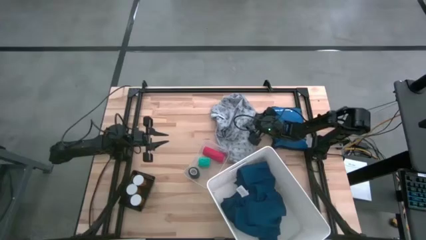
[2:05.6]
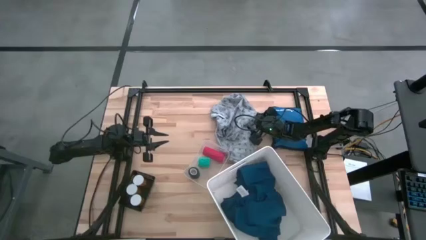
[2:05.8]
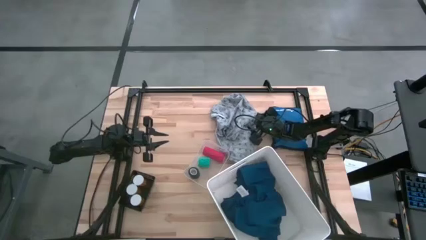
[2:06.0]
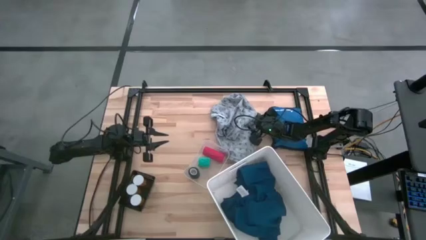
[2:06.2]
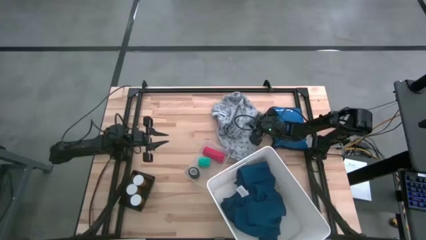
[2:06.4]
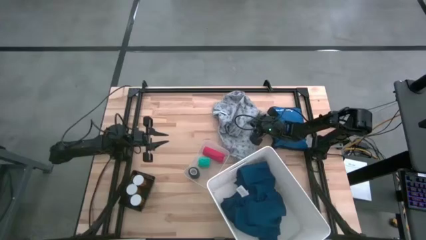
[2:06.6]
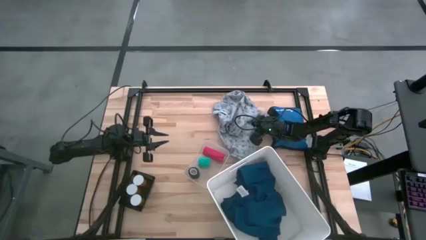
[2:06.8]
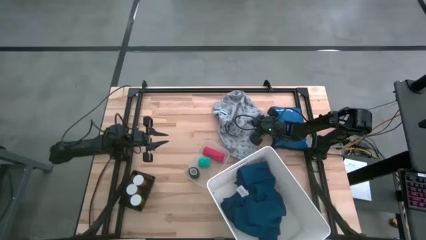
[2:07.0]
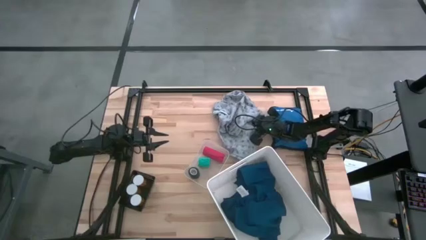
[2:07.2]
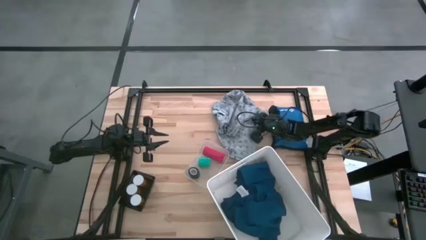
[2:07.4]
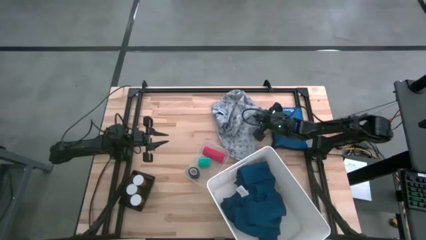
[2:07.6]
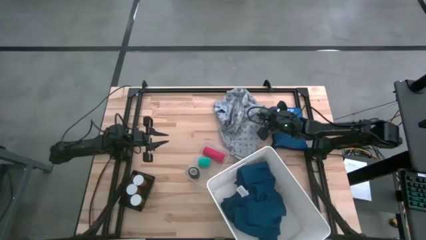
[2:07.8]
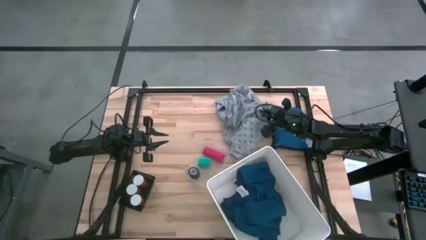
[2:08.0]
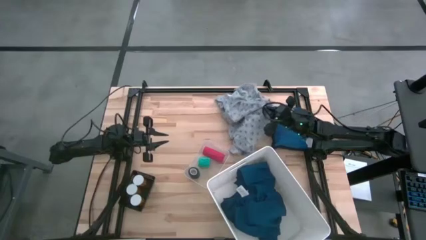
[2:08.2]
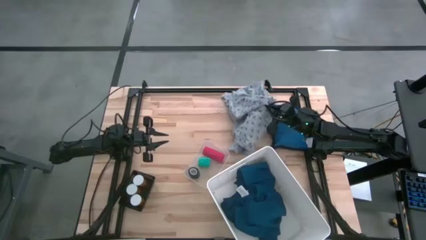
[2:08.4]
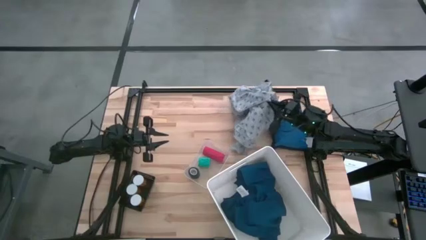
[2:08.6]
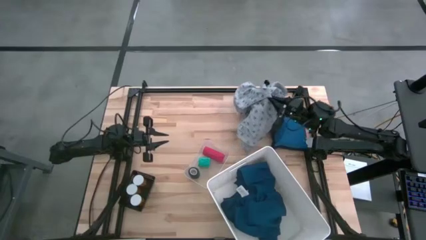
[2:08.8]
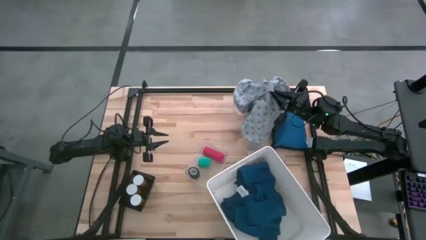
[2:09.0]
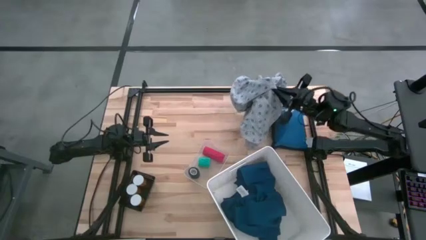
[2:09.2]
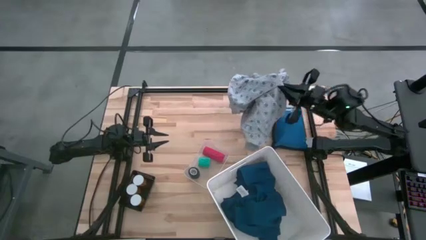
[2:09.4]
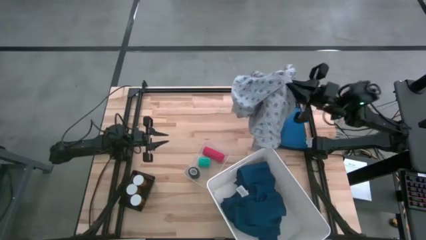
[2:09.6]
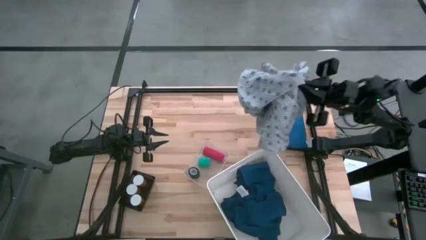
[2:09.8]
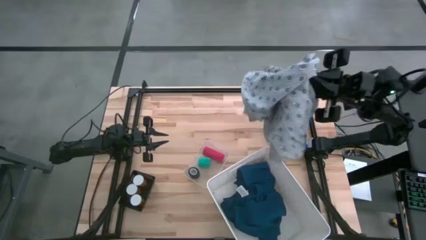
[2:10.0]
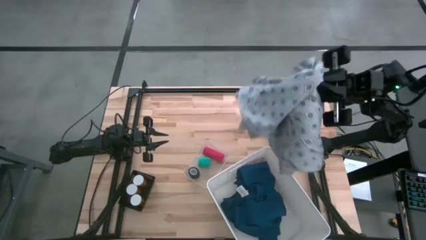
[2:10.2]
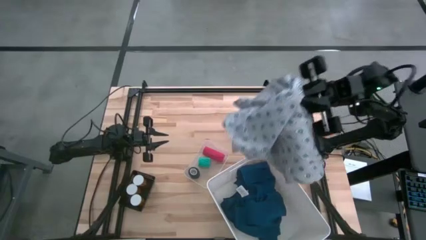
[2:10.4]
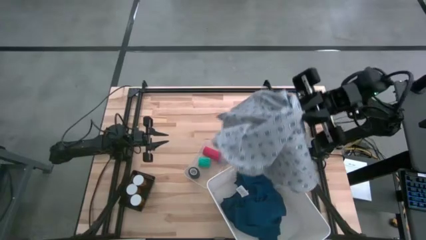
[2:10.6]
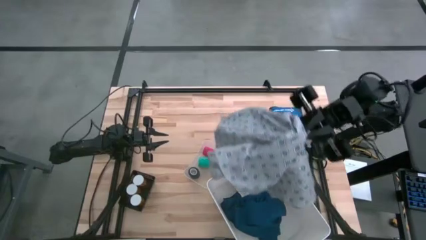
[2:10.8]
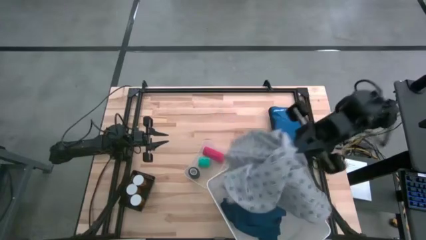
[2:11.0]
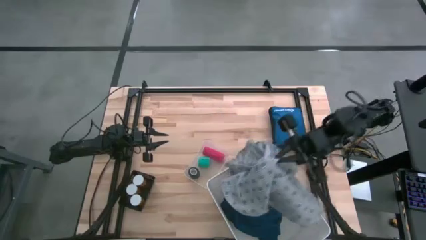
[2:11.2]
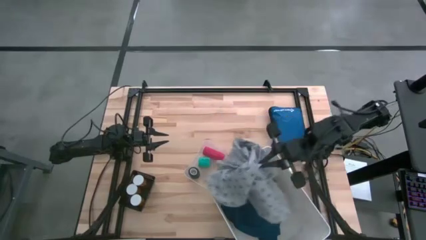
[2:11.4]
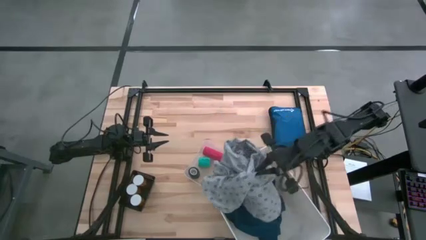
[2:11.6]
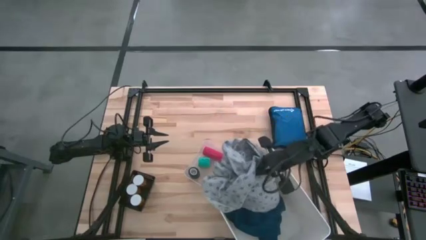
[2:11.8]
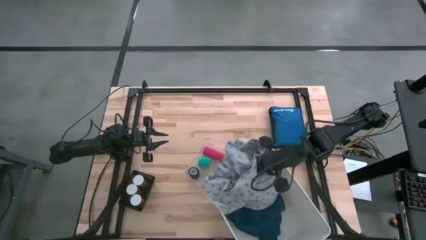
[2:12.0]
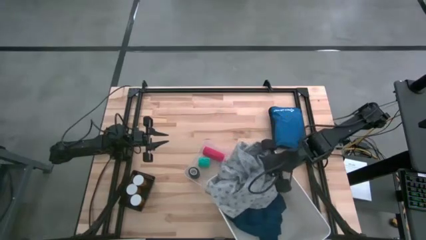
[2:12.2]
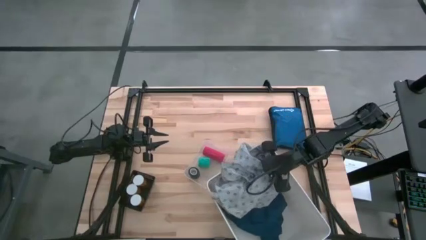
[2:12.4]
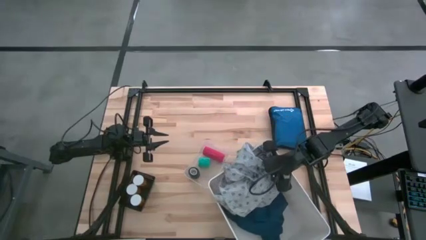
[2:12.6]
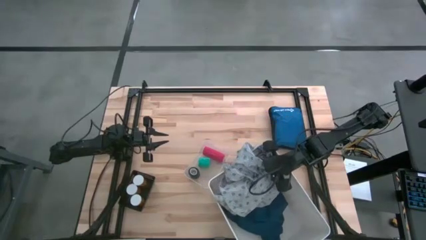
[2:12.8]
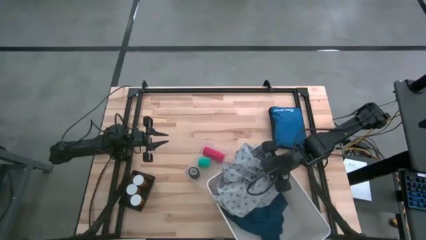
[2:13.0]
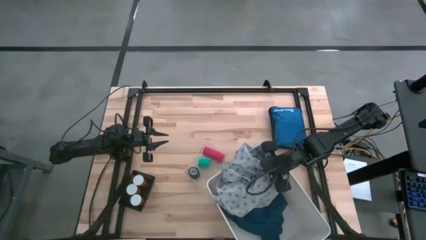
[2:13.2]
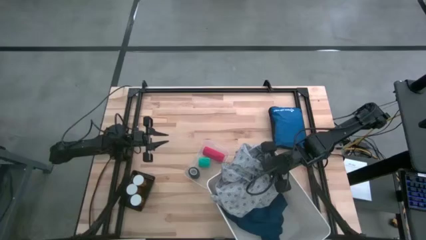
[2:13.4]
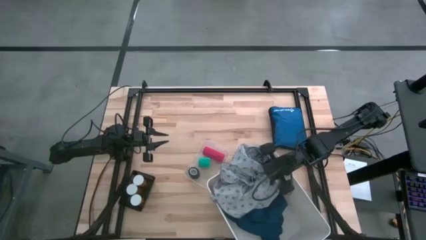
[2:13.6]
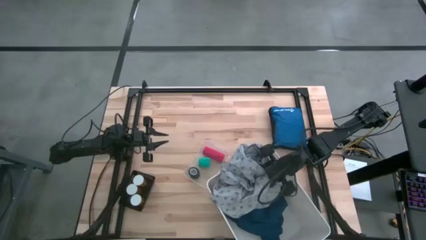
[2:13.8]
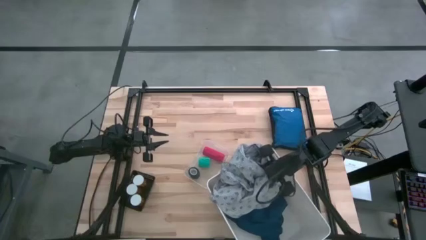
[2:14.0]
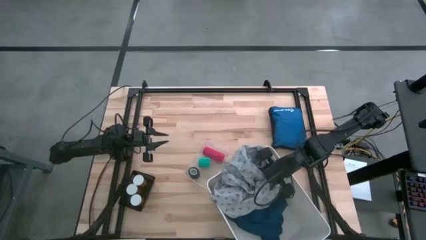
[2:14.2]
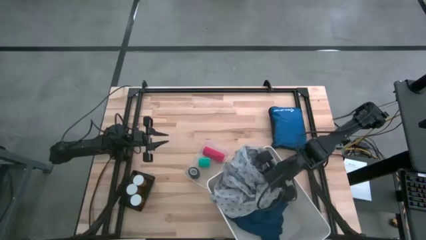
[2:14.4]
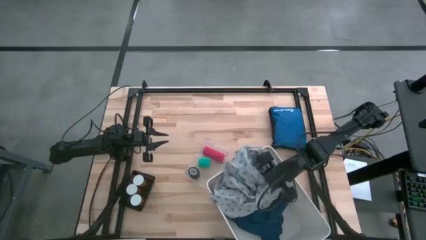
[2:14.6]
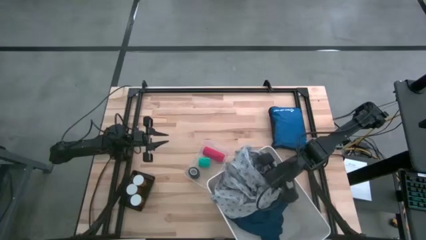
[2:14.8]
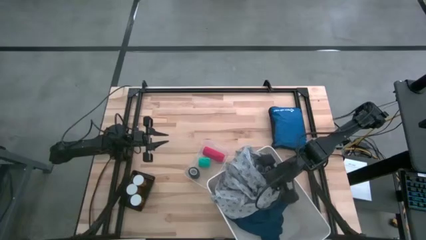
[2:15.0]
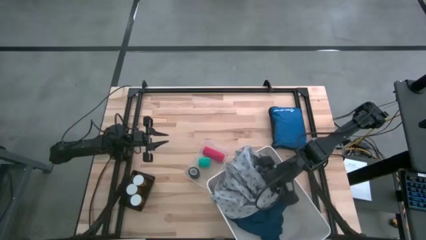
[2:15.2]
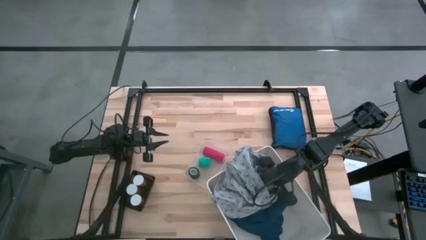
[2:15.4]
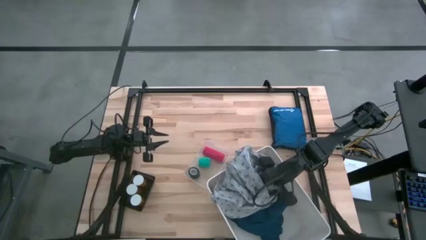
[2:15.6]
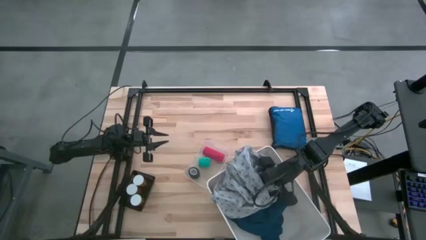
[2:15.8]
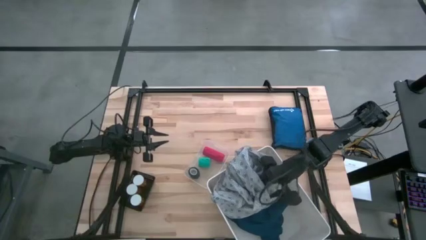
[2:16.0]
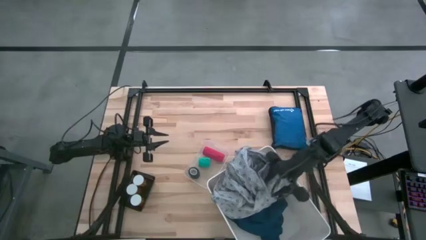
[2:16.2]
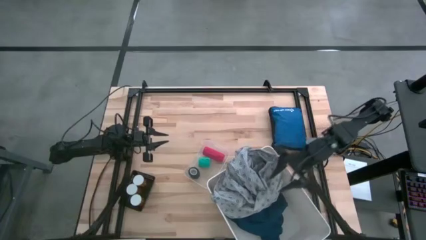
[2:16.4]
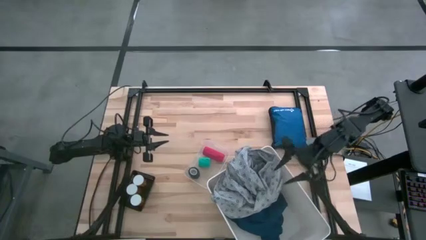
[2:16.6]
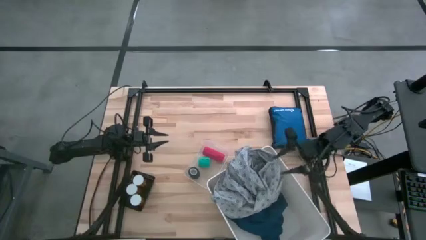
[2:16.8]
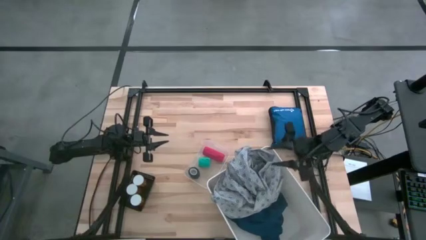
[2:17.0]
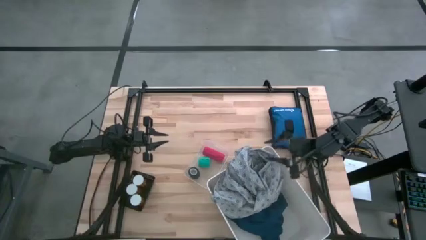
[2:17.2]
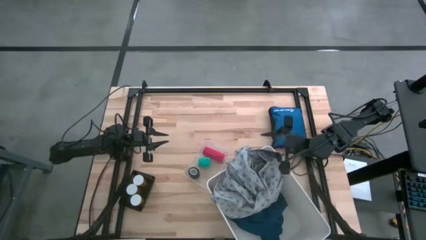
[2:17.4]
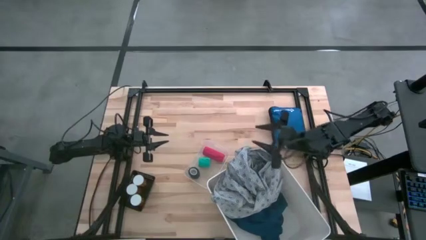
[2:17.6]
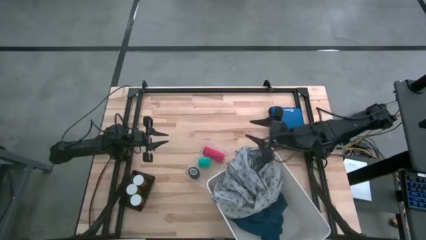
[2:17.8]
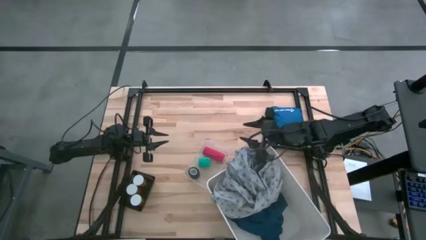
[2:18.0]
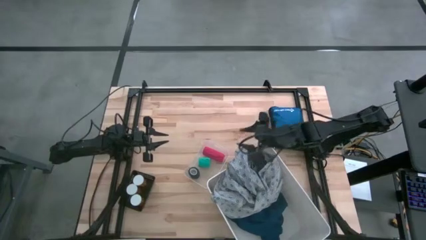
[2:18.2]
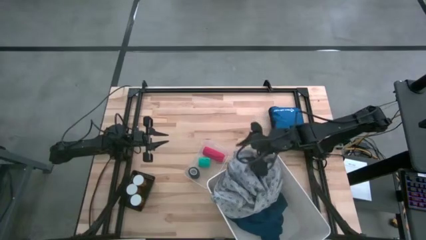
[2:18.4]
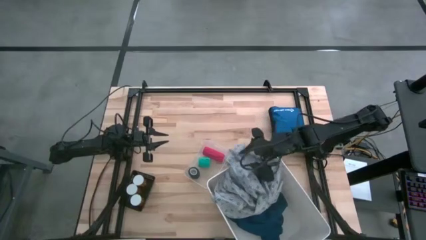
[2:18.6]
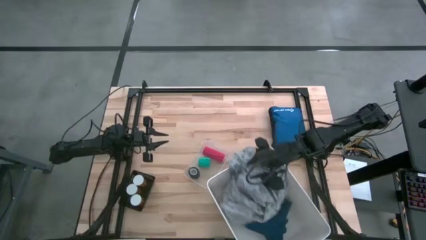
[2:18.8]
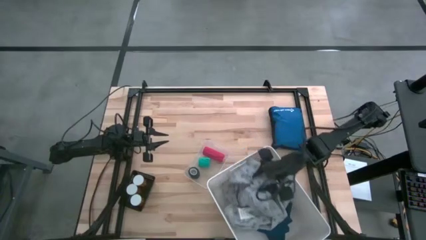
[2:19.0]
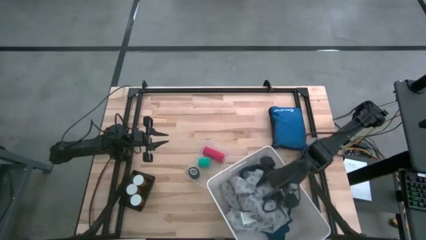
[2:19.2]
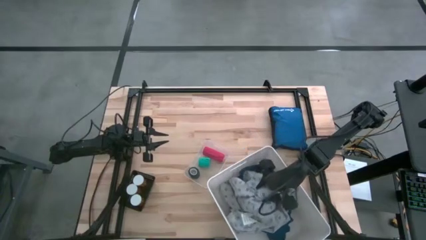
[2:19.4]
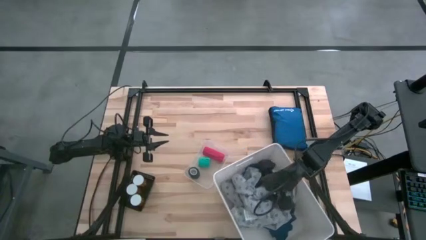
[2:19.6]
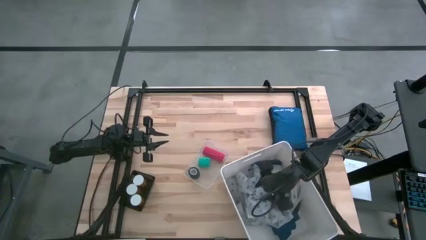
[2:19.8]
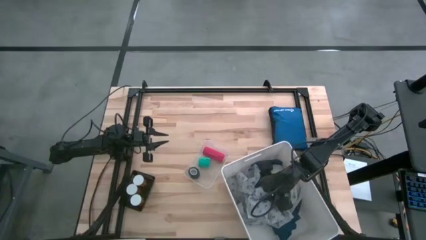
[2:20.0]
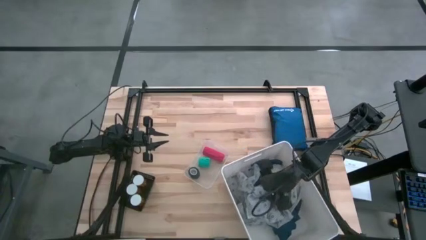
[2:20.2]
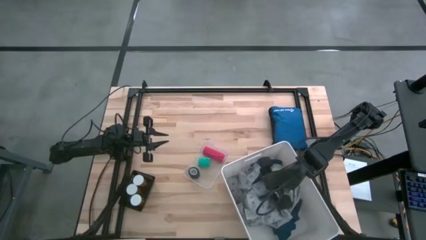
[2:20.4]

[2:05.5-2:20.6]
Task: Pick & Place Medicine items
Put the gray patient gown into the white bin

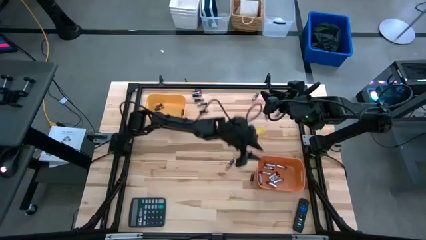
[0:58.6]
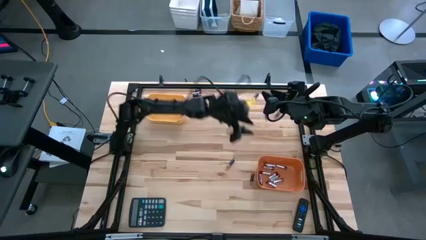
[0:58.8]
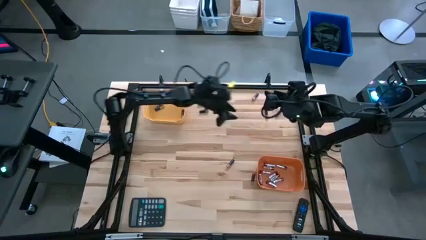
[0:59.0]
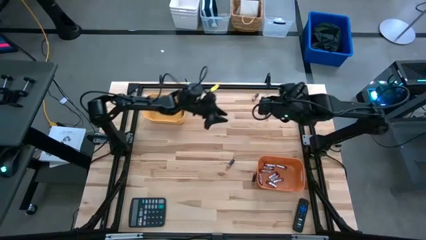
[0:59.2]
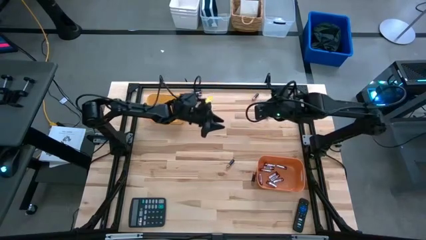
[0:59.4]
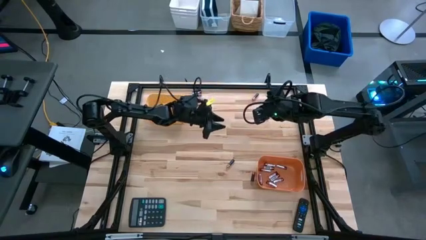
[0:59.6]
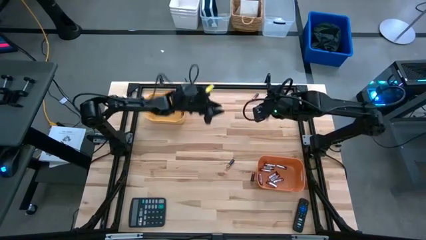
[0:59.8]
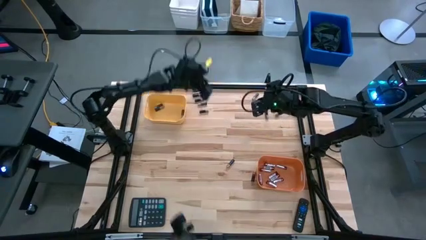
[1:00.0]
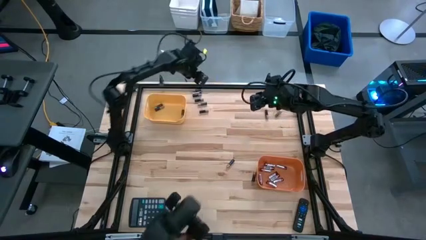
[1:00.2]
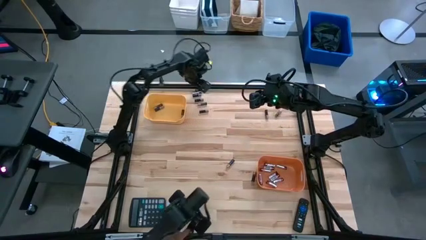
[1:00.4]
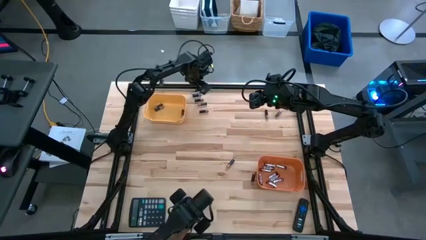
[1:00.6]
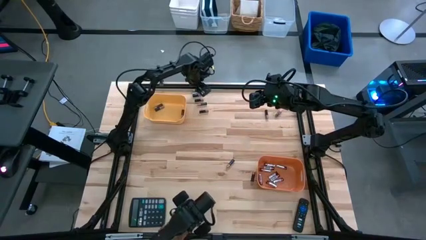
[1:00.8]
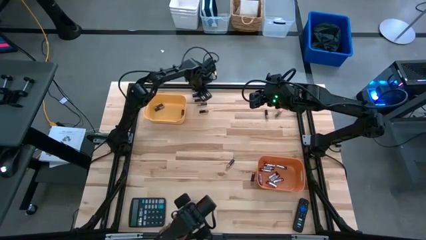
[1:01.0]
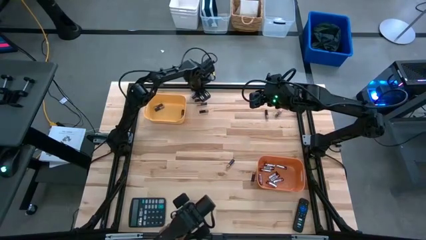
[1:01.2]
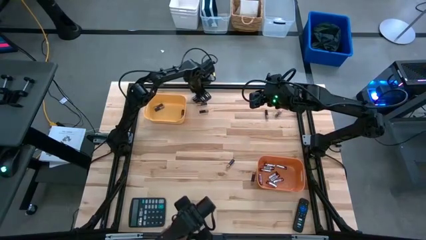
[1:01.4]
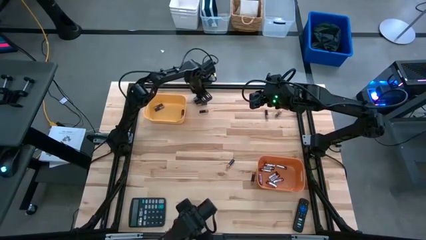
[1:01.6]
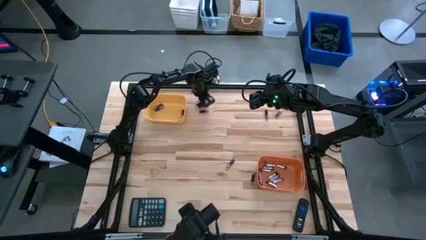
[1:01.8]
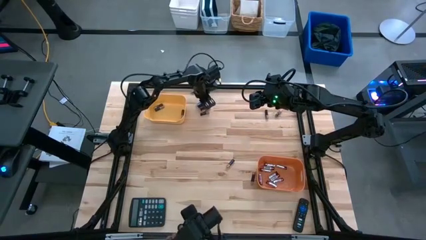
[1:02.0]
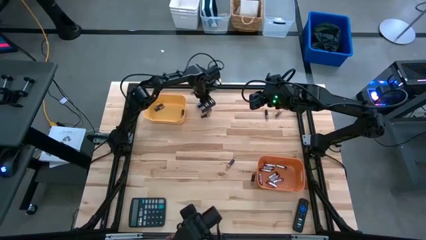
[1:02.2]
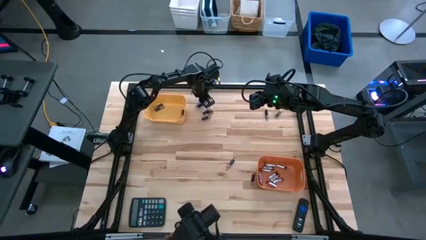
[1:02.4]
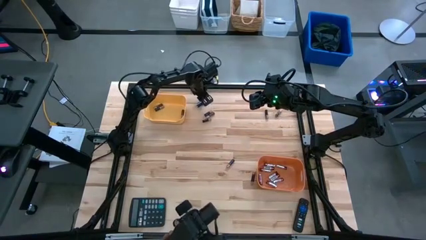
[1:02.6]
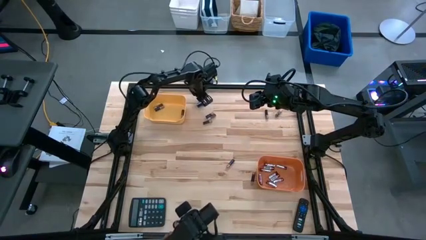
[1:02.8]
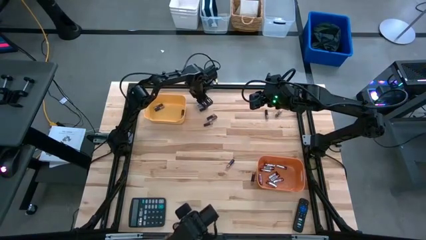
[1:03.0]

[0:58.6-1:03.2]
Task: Sort batteries
Put the silver battery into the orange bin
